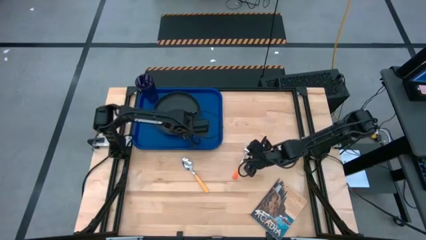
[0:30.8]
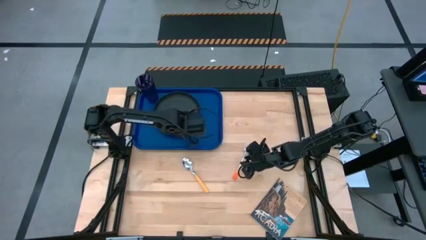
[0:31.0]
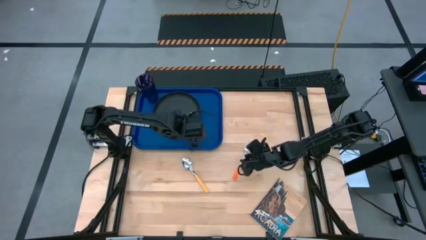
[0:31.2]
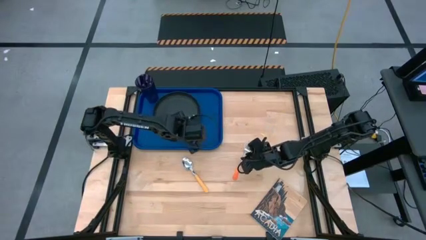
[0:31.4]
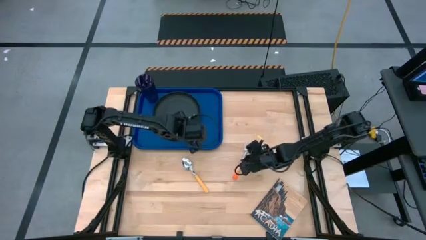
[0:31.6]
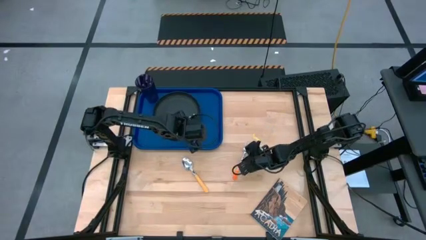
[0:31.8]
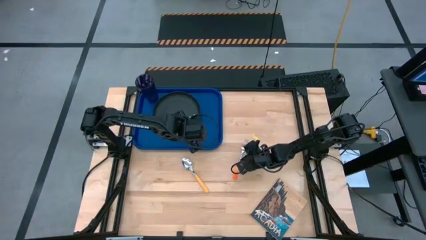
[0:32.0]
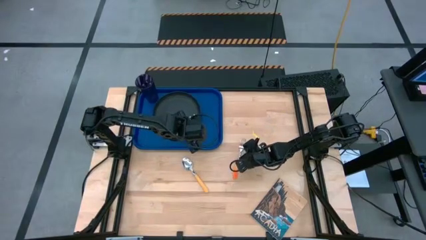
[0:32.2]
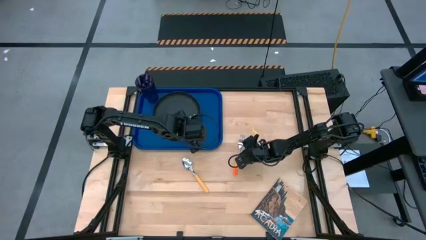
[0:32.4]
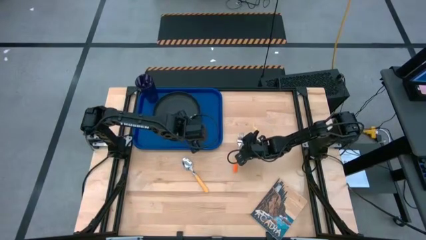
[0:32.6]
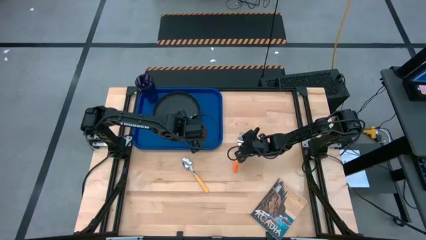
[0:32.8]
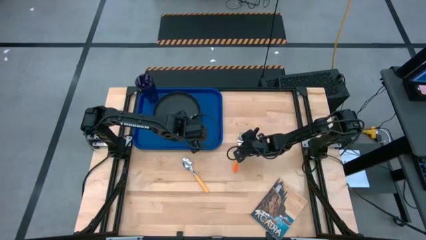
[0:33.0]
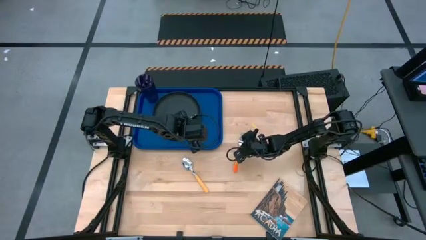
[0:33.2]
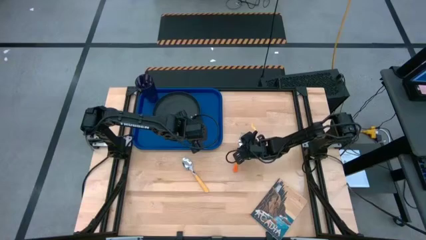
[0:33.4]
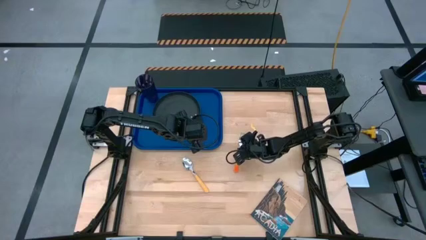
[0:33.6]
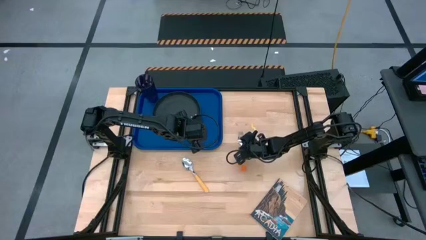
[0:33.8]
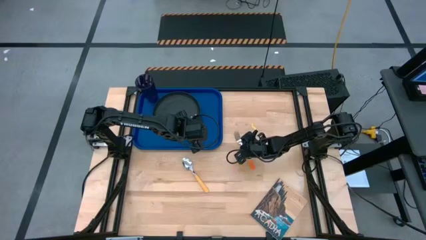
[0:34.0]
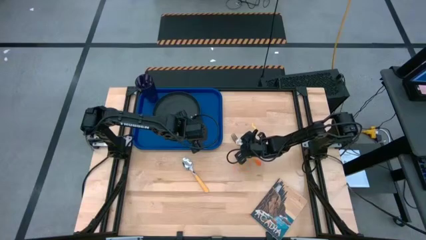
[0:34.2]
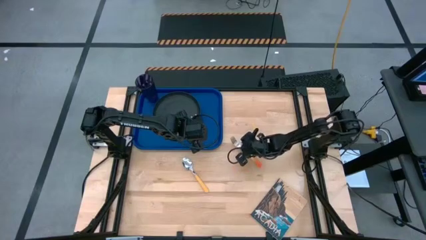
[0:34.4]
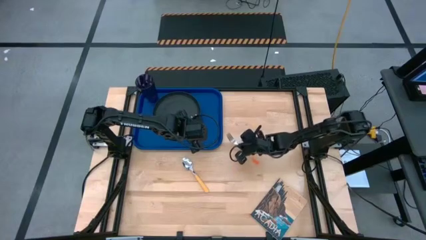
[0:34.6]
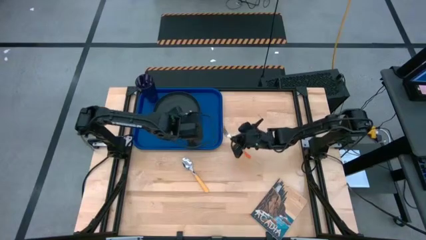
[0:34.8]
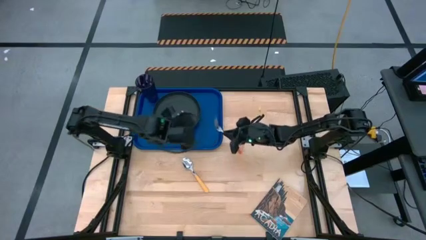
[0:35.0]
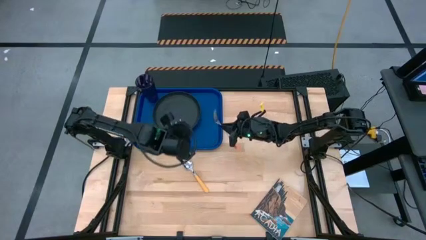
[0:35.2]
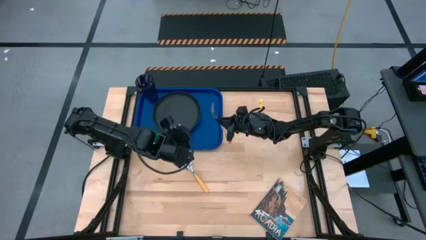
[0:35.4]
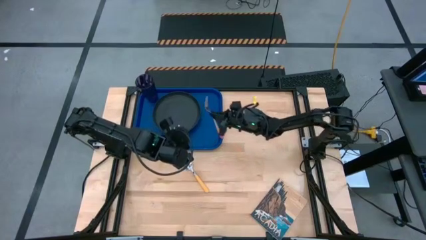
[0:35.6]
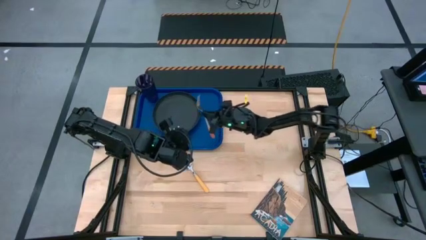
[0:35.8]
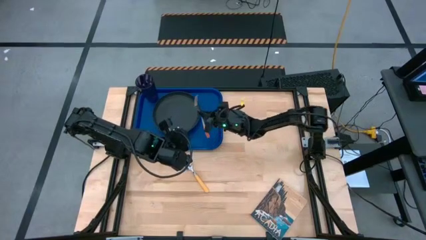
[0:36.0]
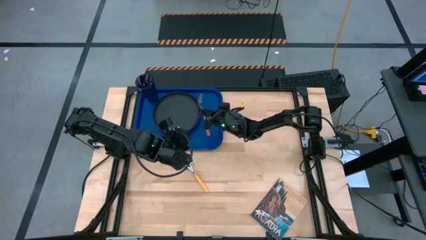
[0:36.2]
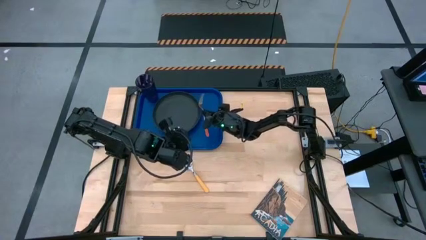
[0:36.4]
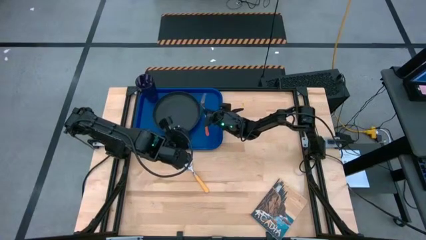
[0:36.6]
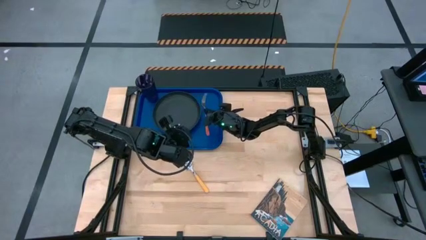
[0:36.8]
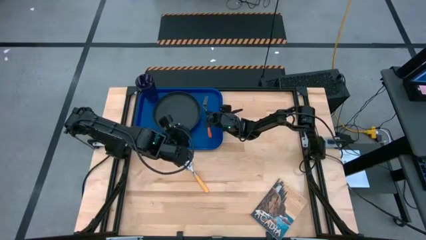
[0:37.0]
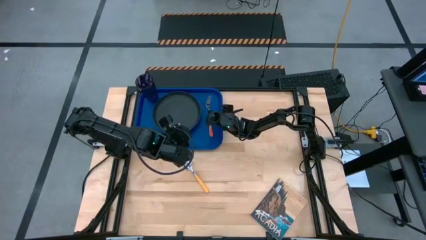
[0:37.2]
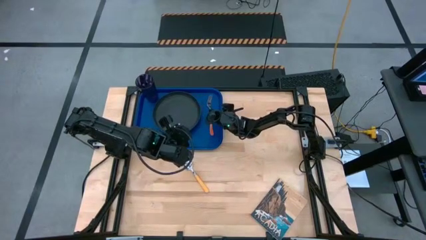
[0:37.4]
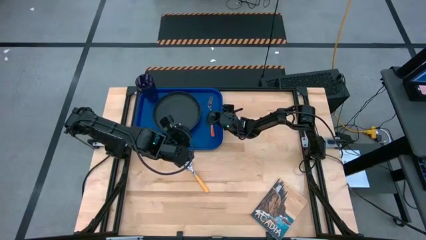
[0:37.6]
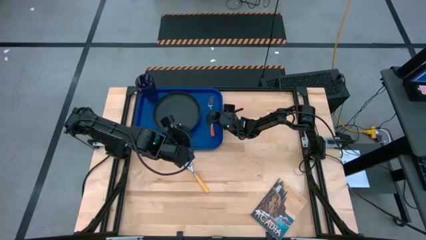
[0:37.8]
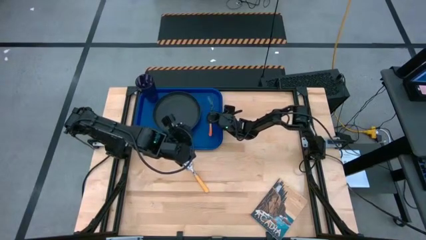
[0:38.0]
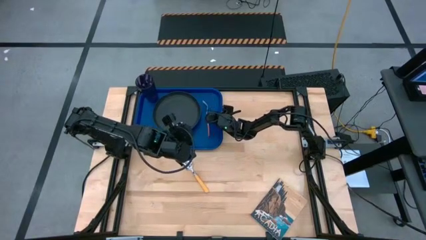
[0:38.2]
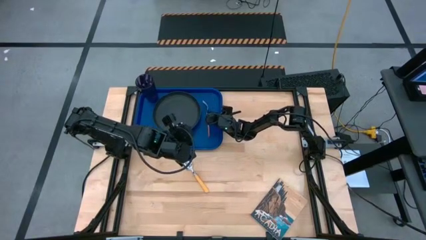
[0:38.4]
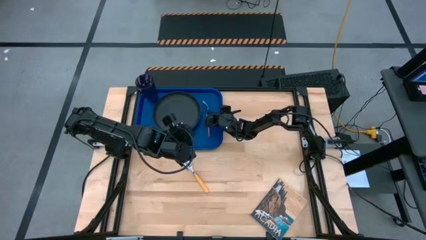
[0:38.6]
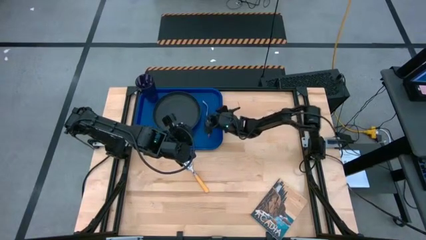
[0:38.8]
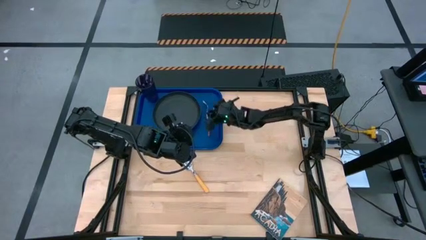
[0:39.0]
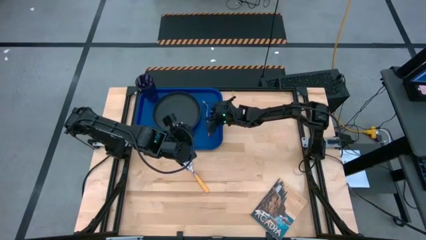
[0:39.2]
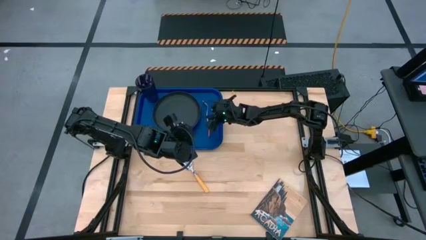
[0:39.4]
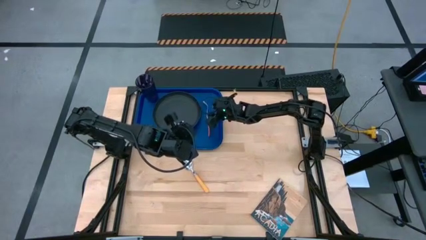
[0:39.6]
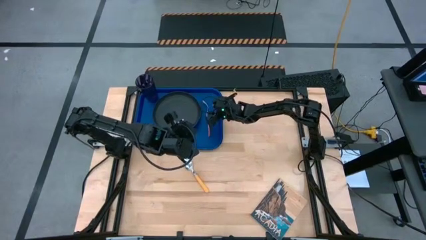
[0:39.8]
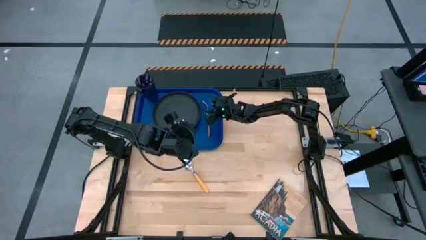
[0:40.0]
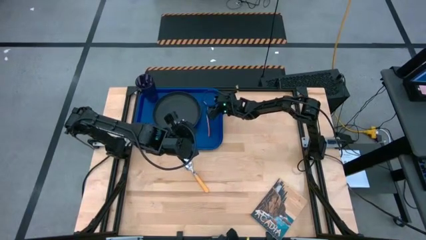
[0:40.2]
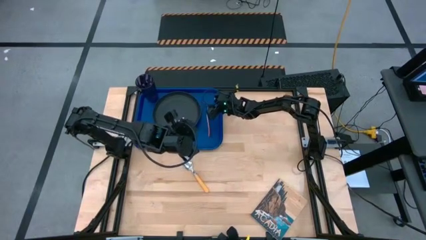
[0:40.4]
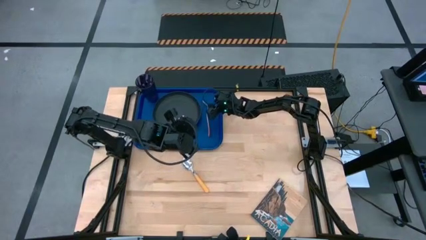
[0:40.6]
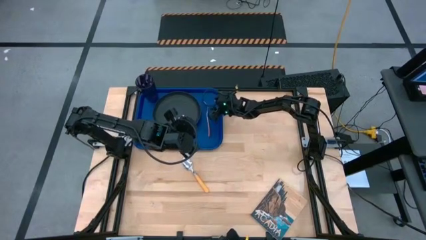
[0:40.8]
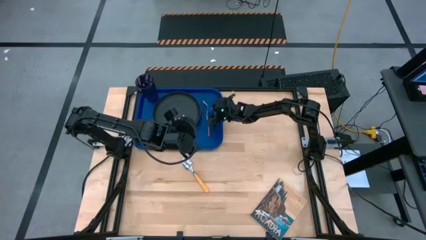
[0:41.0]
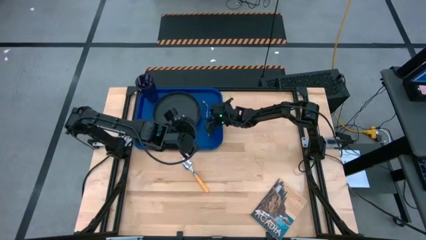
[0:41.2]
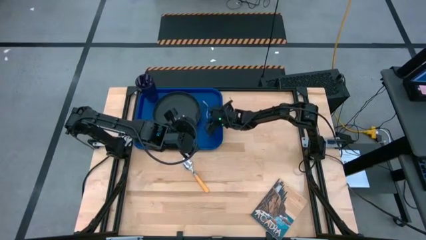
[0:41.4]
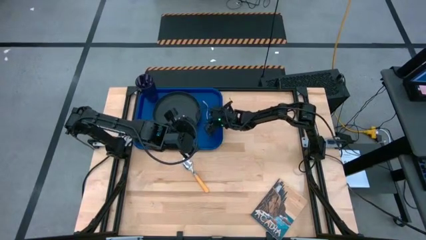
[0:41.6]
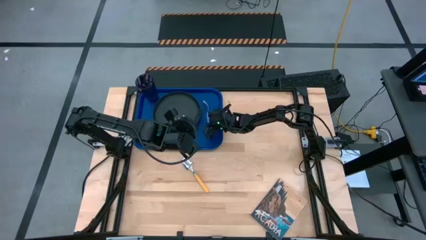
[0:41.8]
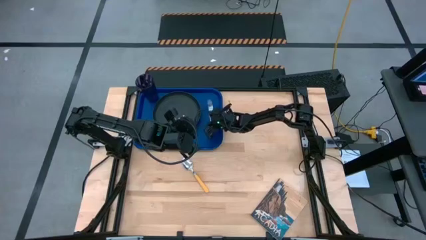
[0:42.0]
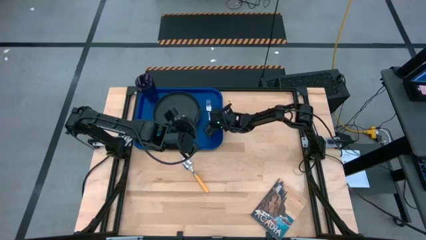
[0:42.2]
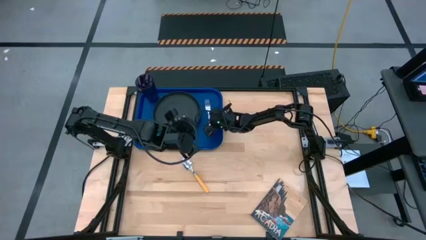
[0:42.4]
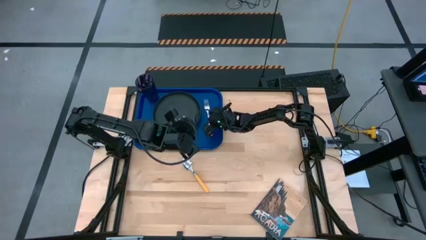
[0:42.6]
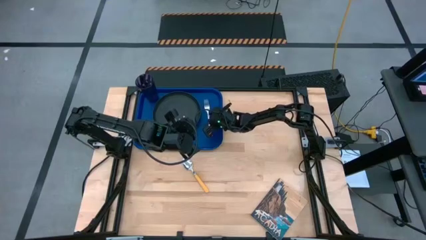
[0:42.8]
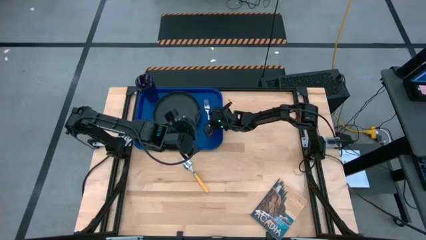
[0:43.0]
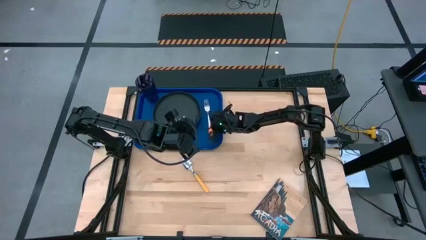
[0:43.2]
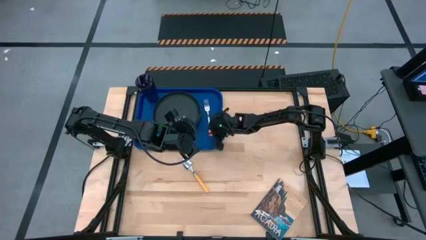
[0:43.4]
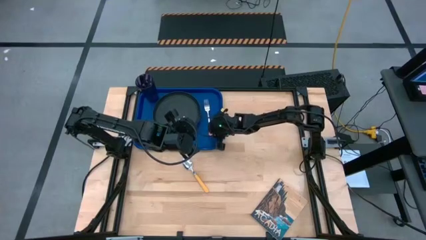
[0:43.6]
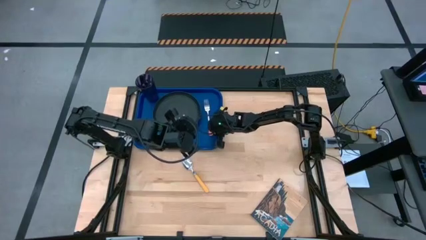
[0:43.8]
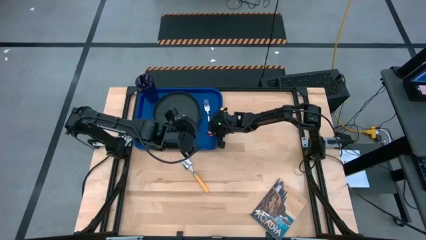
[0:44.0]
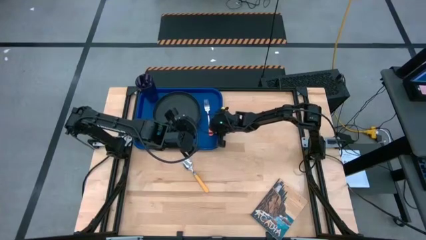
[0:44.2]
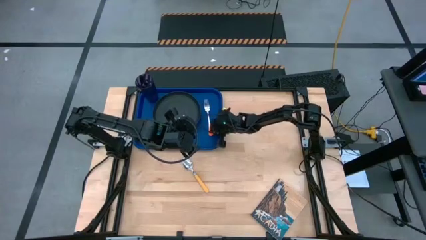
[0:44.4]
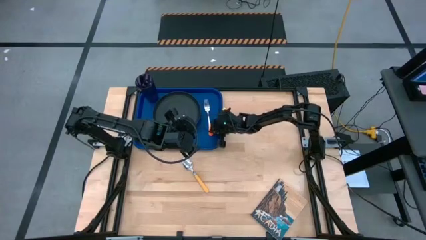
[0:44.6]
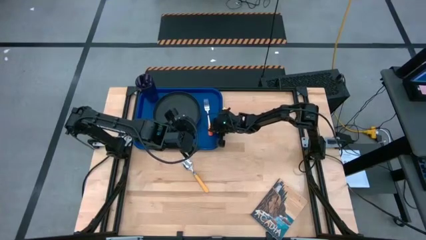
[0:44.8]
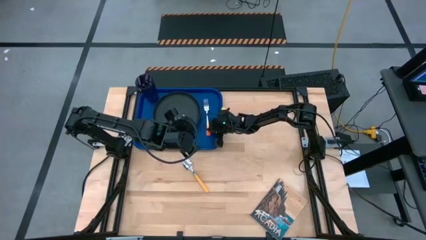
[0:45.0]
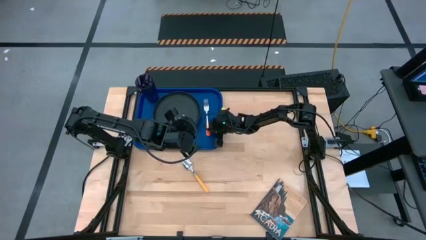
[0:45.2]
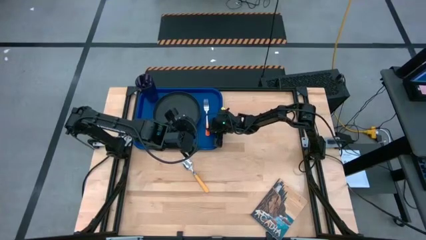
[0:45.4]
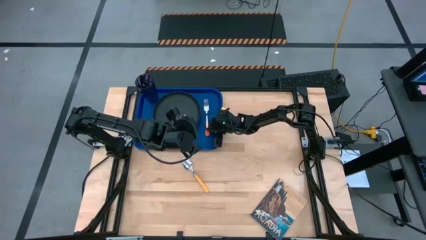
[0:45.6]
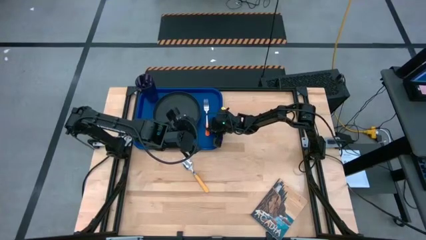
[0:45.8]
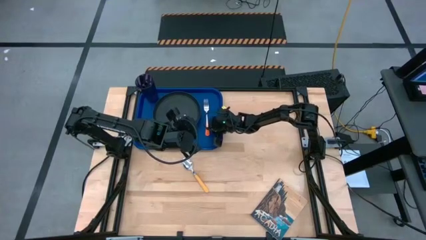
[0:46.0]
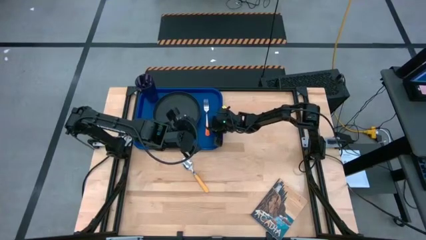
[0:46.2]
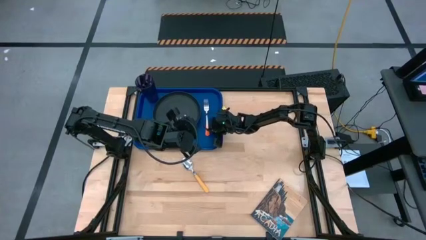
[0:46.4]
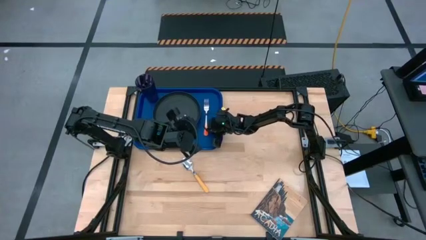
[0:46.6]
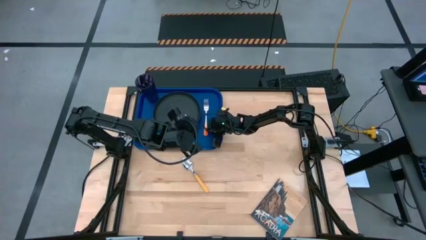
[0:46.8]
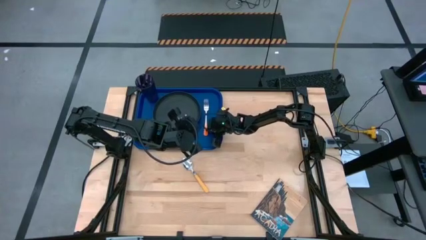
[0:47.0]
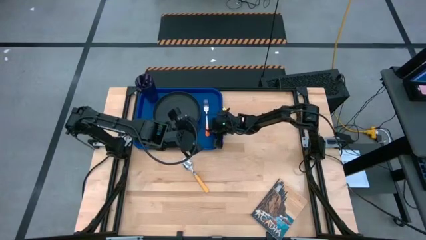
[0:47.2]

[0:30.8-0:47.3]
Task: Pick and place plate/cup/fork/spoon on tray
Put the orange fork on the blue tray beside the black plate
